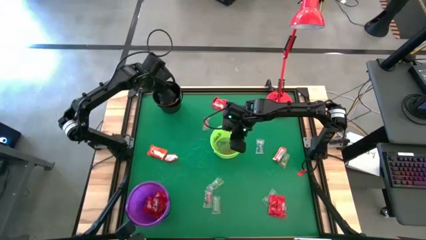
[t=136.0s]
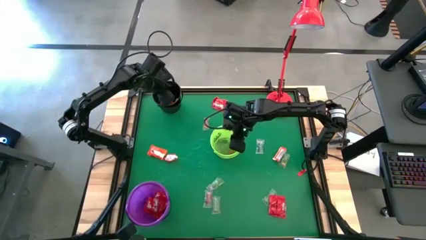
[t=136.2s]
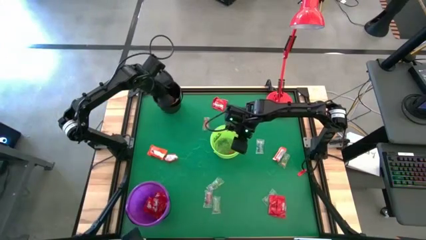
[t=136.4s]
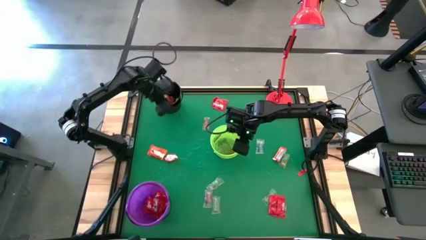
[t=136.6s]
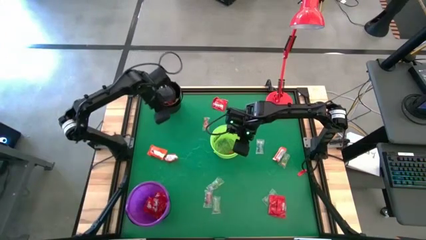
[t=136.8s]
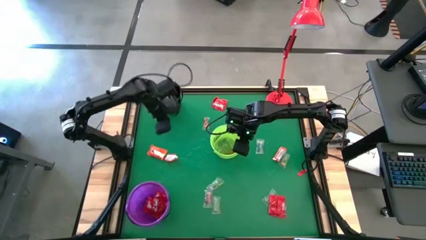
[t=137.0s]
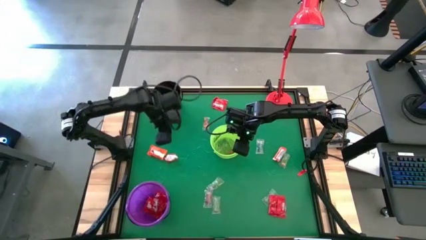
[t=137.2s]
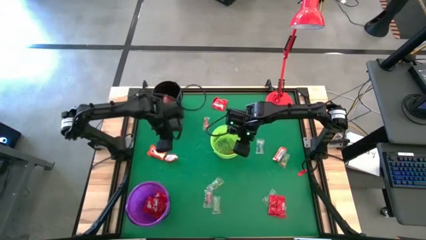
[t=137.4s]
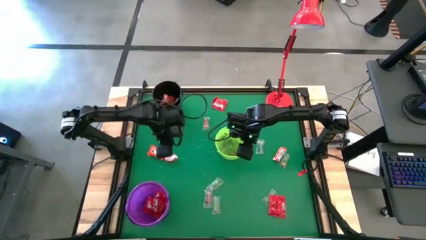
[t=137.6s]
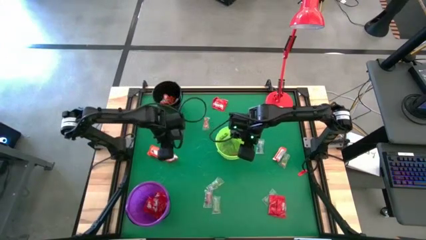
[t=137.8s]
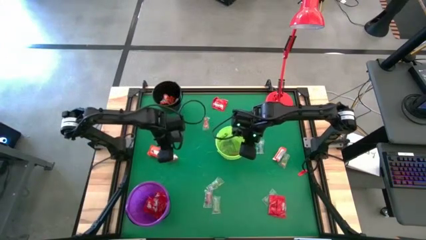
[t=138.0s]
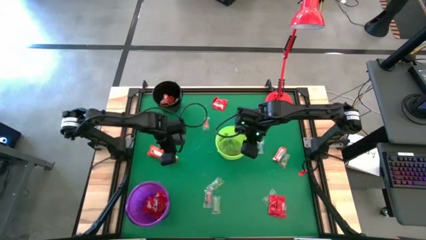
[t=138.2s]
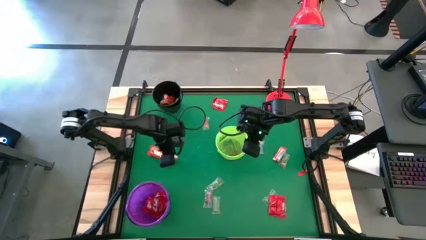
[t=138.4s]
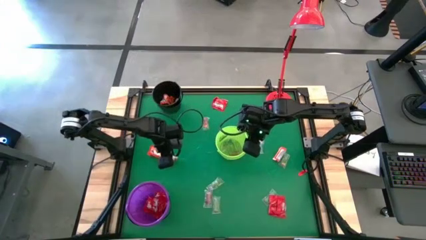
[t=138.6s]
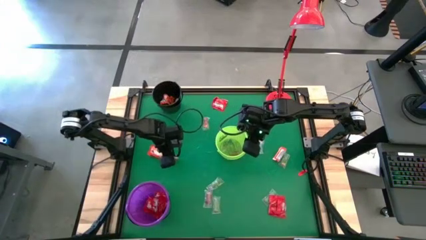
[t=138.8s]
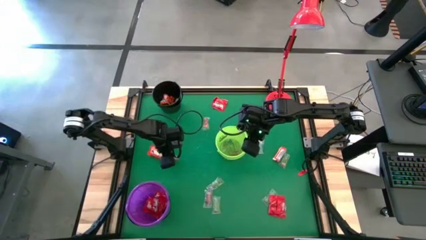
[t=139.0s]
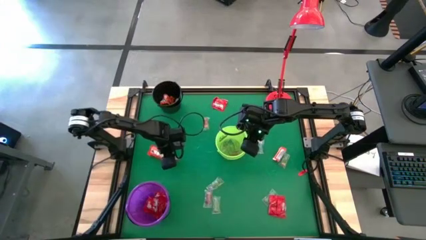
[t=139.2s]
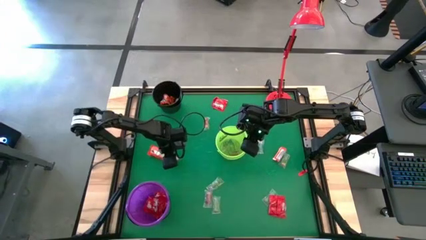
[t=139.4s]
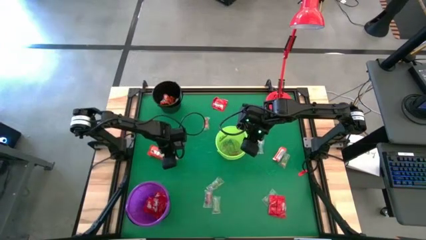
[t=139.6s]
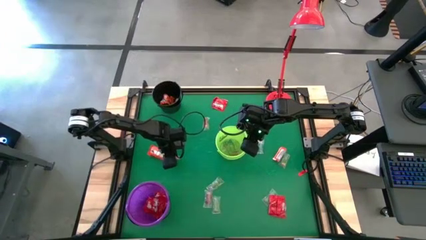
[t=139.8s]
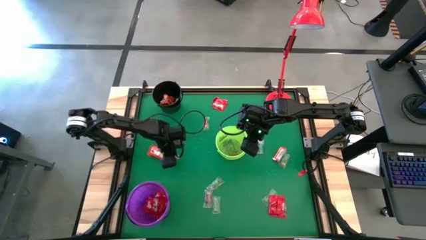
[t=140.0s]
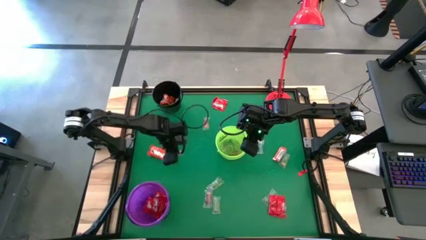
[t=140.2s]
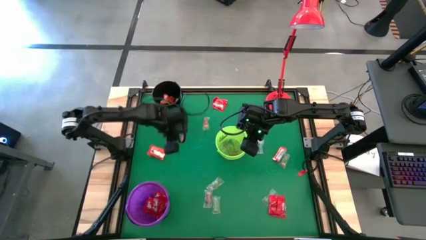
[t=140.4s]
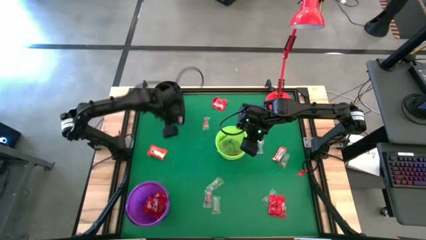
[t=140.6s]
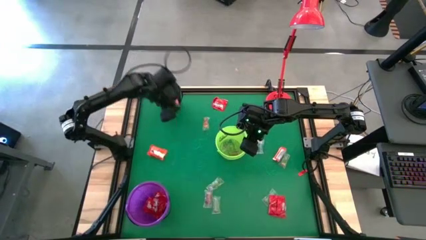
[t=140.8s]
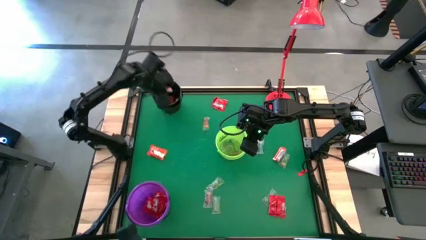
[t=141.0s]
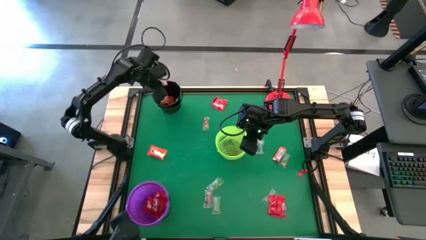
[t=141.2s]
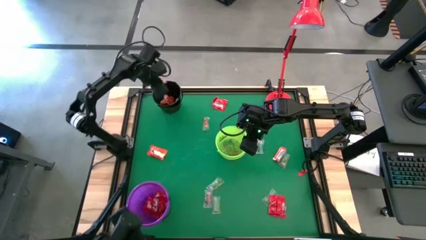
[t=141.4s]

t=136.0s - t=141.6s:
Task: Sort candy
Put the orange chocolate into the black bucket

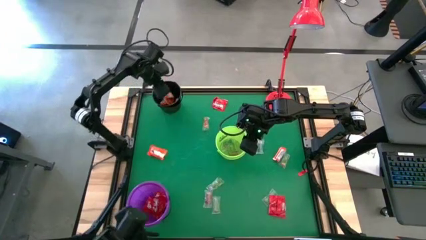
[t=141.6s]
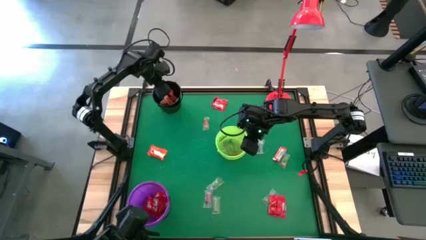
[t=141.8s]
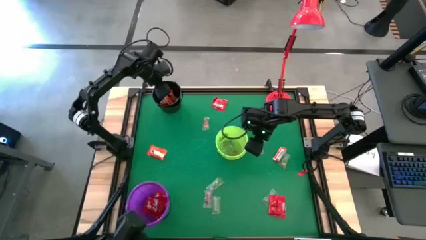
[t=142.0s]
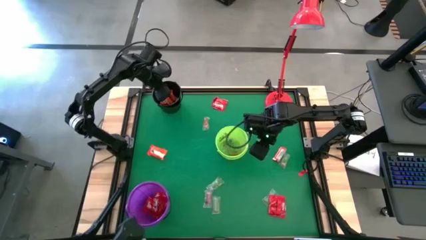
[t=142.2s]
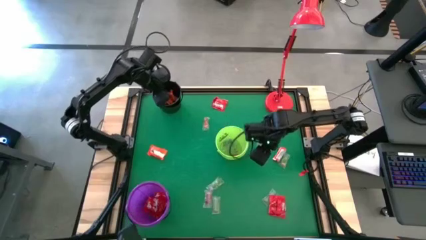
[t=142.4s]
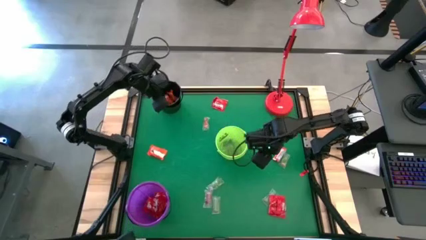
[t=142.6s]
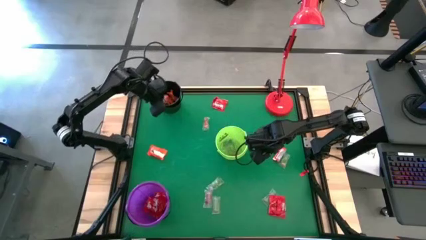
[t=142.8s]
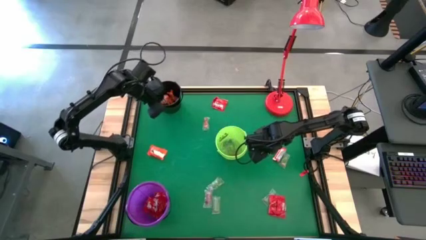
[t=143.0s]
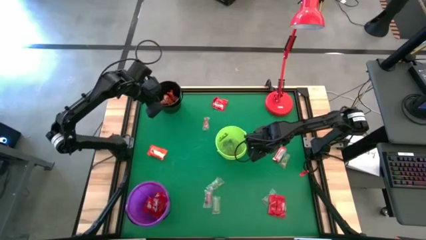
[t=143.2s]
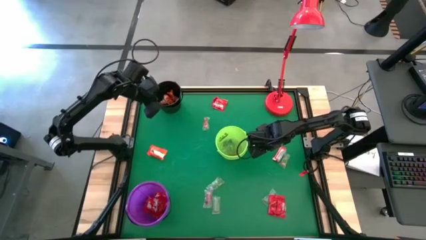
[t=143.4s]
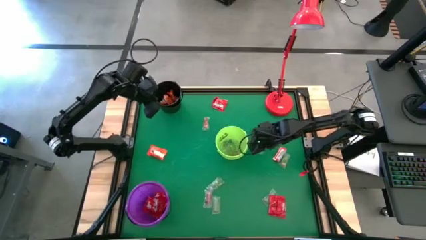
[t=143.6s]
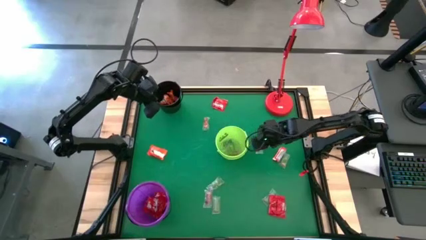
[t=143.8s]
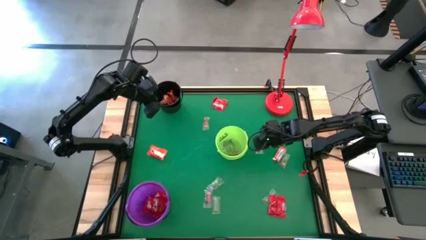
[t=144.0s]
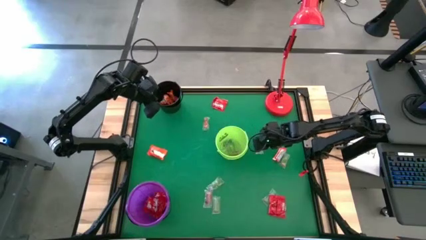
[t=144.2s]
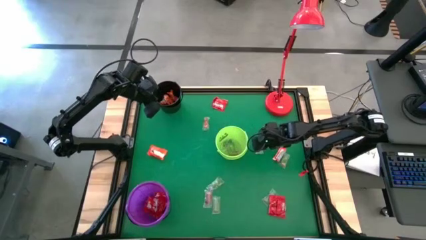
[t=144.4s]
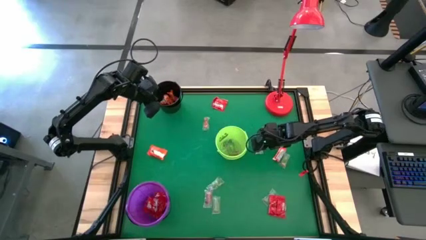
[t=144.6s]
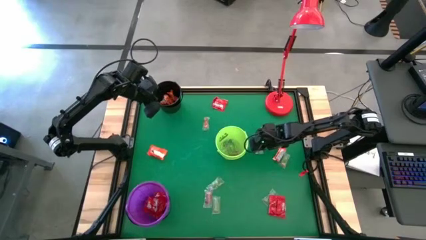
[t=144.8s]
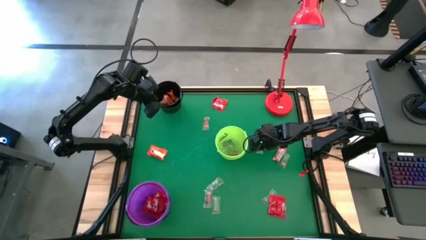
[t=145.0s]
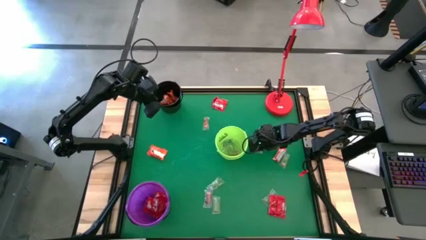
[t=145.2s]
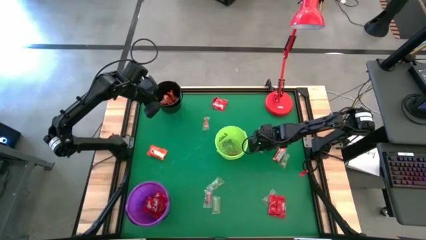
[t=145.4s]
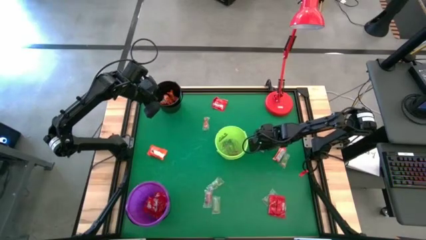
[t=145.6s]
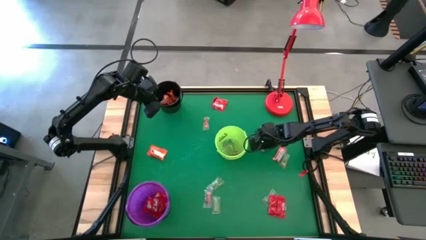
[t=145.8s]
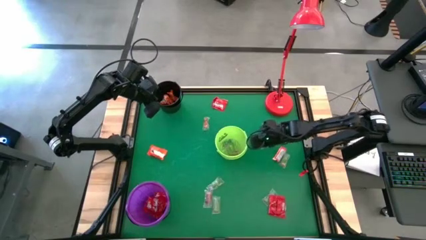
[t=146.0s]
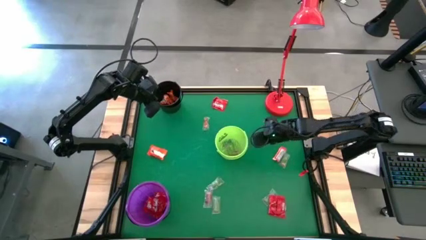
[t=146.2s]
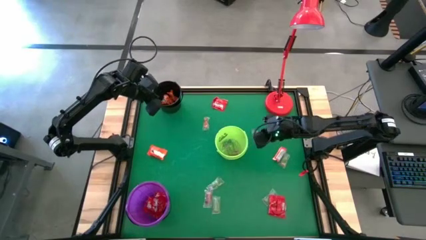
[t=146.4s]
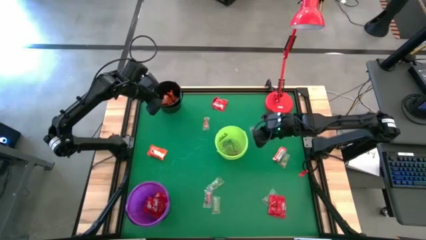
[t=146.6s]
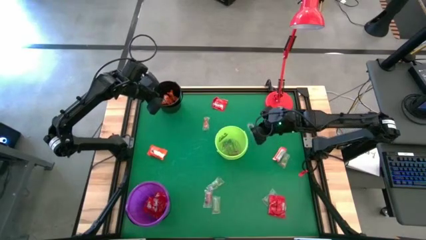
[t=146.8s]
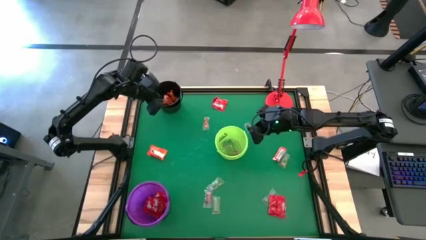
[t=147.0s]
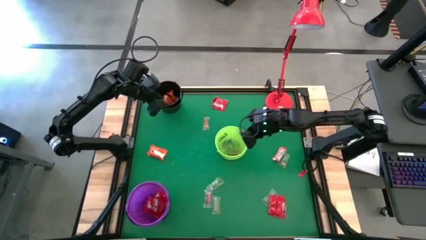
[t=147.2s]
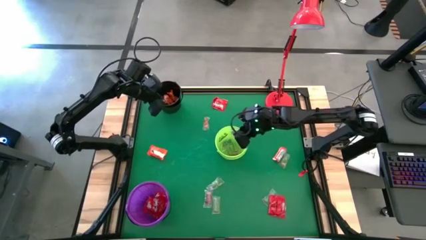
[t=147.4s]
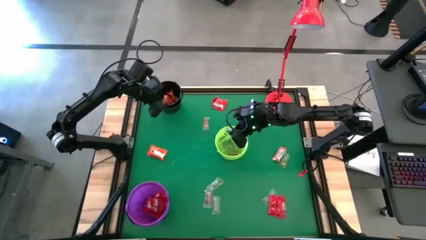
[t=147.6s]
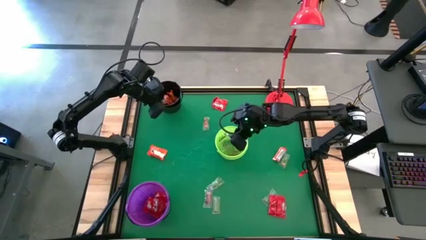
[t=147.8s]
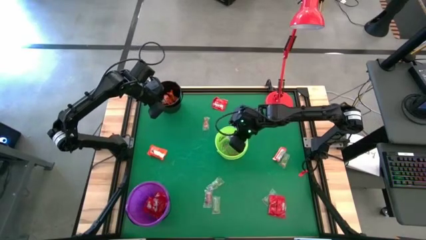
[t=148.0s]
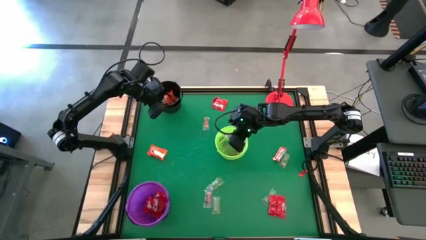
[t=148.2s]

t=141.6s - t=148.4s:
Put the blue gummy into the green bucket

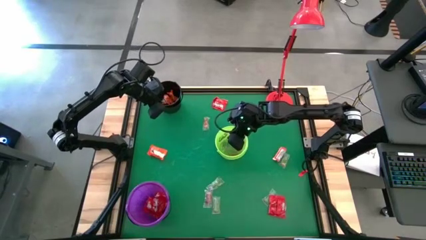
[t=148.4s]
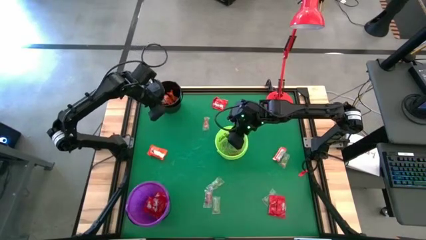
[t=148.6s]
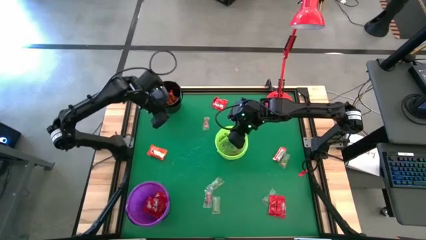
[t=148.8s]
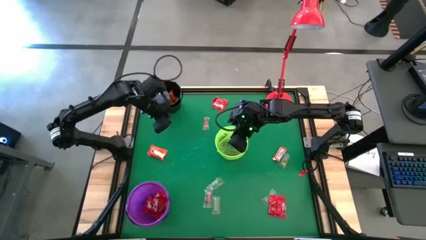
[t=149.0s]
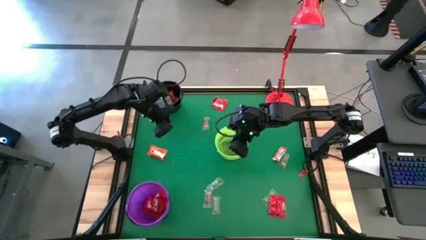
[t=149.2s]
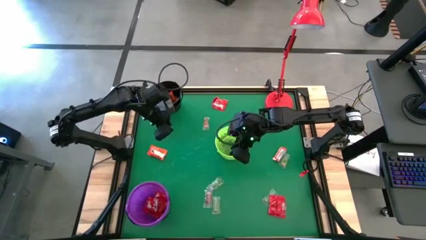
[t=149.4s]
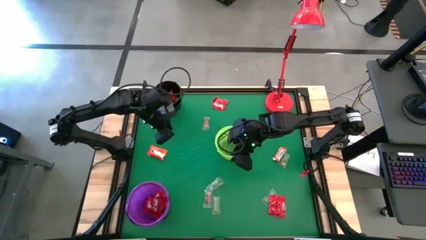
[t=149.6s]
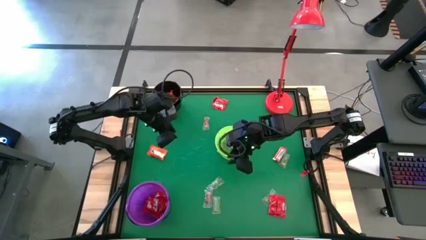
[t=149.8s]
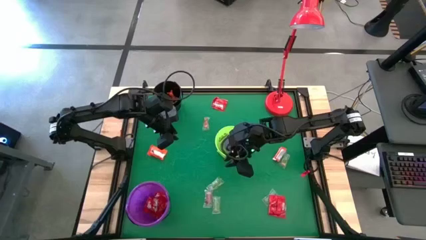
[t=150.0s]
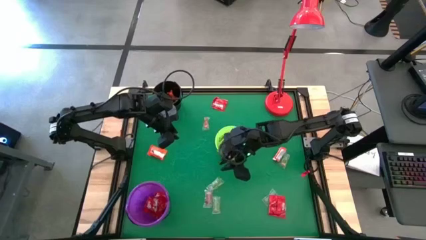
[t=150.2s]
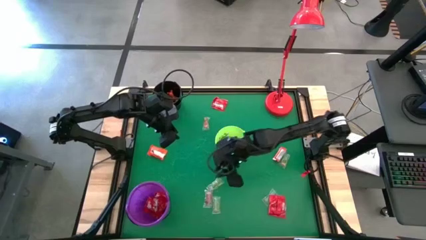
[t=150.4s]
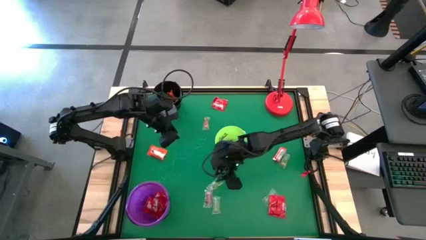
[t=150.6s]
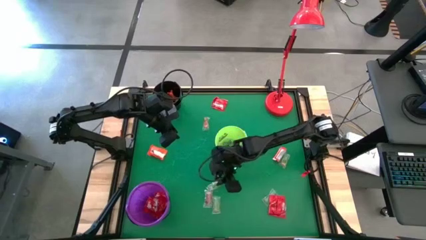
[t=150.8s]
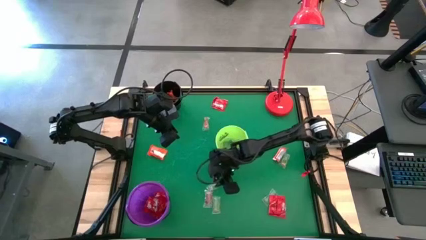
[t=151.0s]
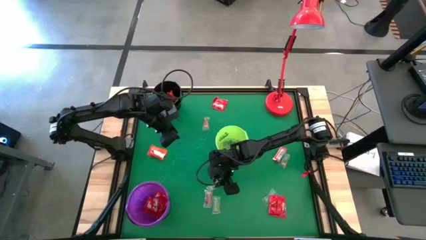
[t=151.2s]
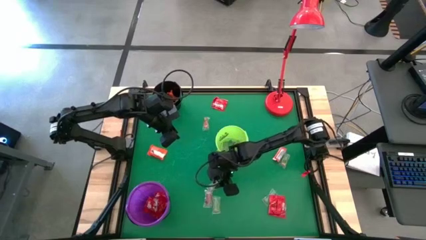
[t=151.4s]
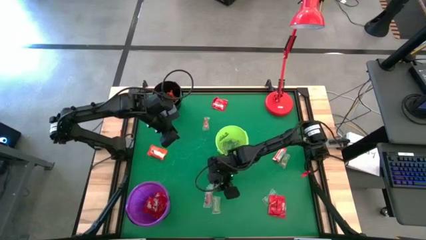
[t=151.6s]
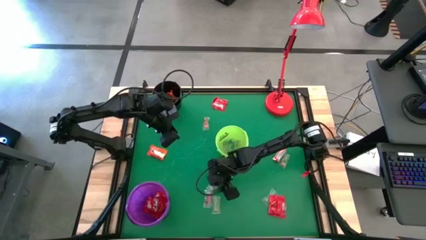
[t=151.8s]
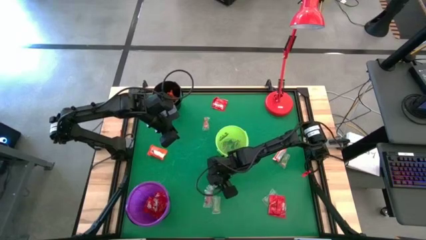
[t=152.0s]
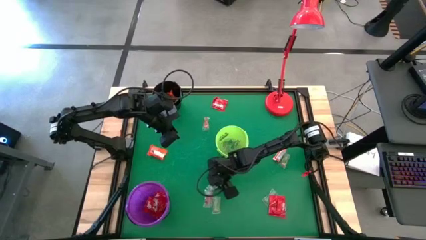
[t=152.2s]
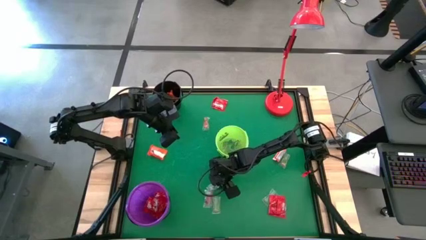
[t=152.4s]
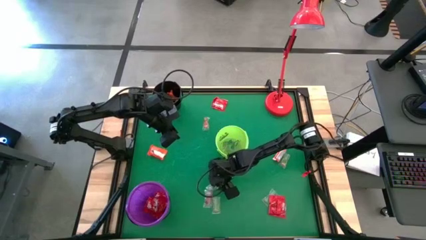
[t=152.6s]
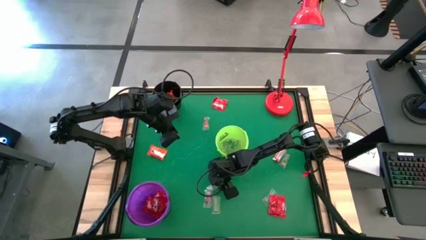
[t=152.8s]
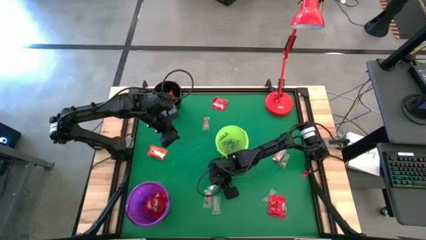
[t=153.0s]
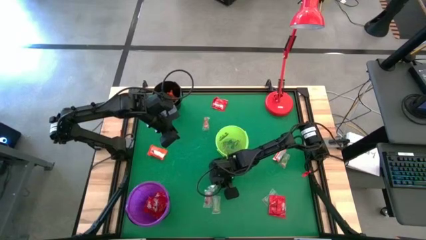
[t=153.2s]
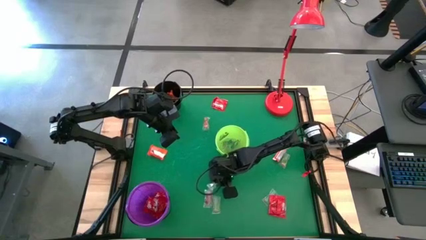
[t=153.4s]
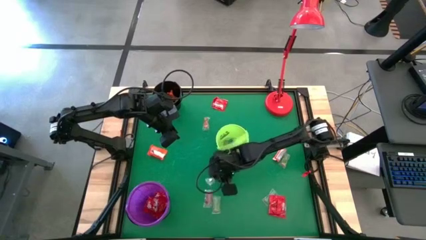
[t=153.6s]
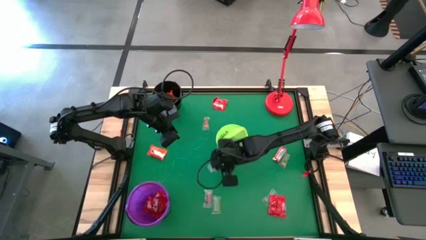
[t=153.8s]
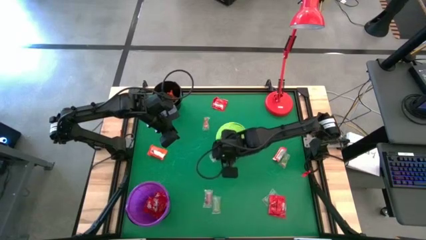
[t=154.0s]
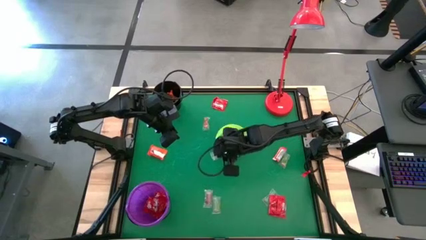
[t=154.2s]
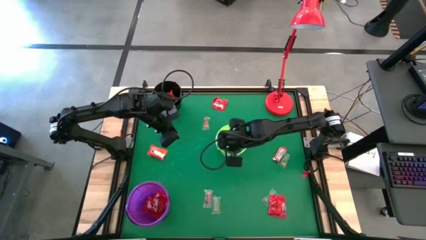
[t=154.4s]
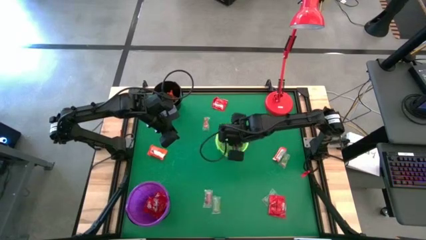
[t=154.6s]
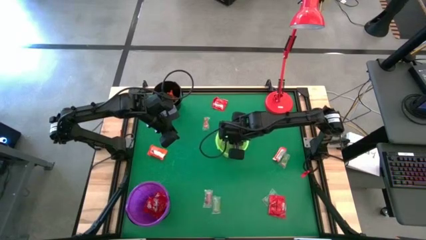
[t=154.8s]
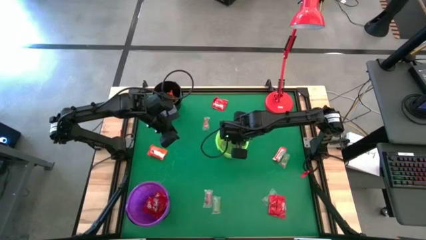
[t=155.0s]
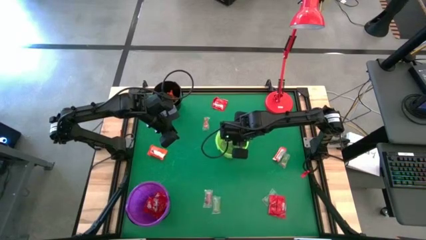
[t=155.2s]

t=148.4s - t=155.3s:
Put the green gummy into the green bucket
